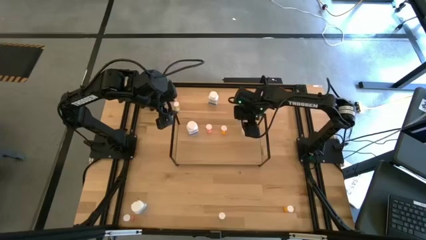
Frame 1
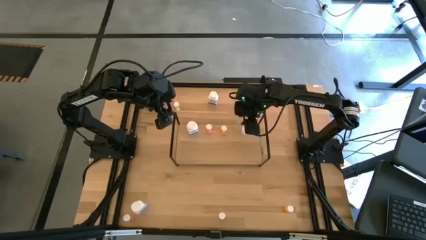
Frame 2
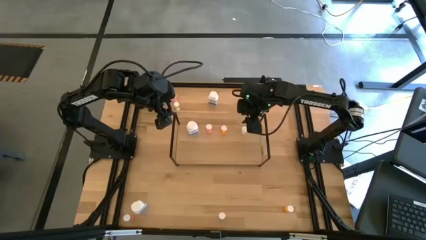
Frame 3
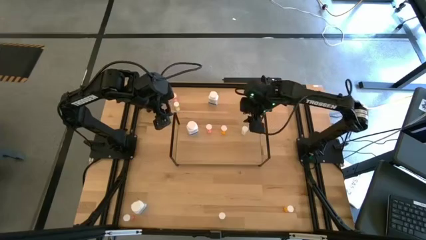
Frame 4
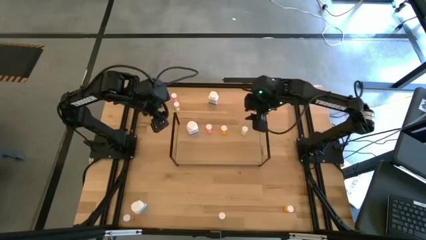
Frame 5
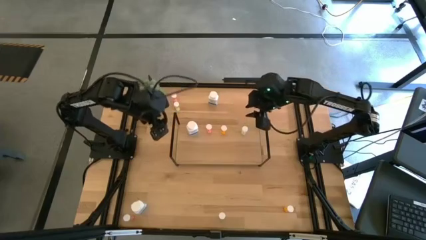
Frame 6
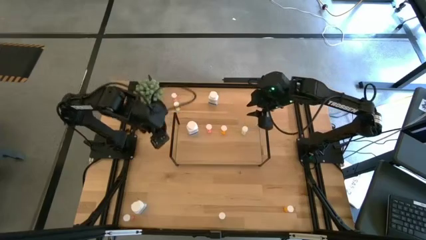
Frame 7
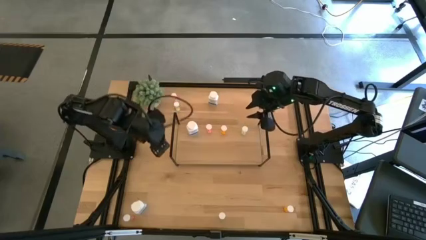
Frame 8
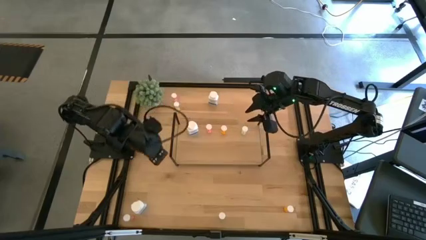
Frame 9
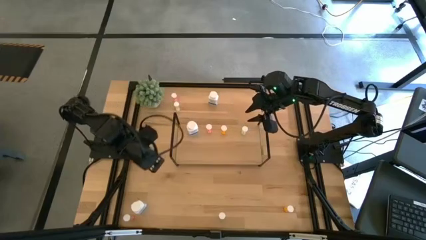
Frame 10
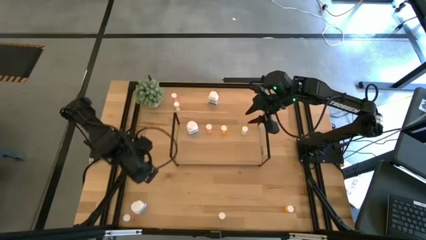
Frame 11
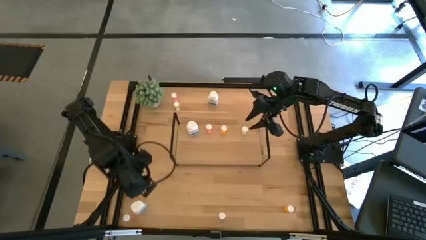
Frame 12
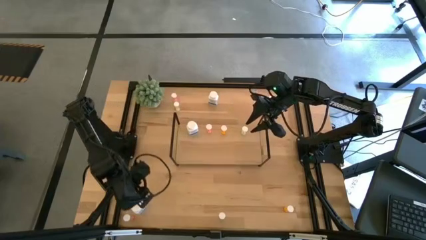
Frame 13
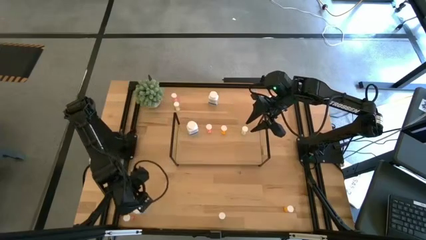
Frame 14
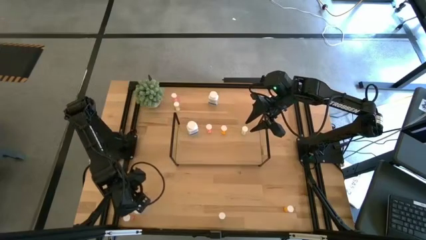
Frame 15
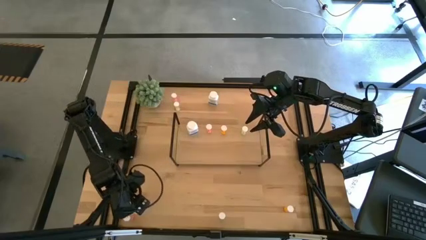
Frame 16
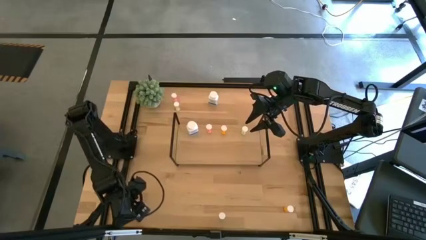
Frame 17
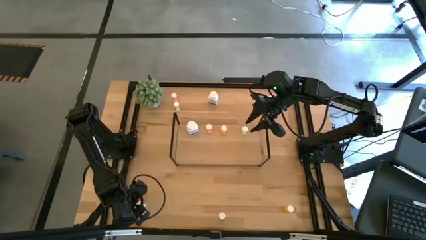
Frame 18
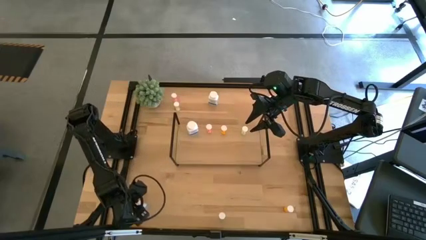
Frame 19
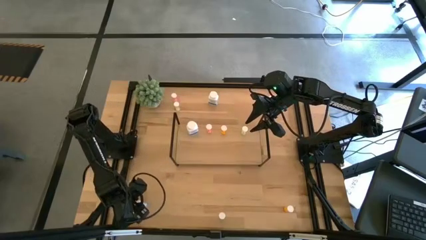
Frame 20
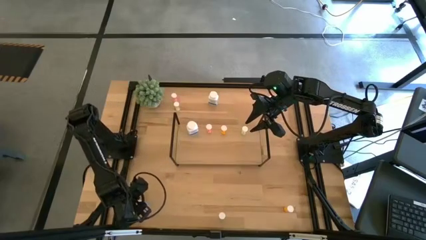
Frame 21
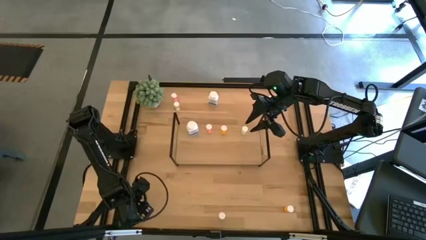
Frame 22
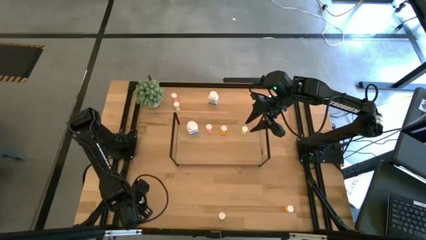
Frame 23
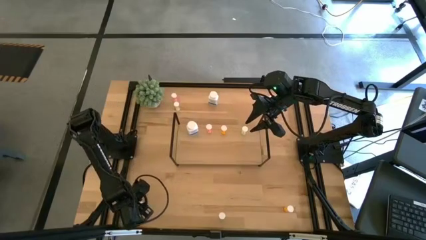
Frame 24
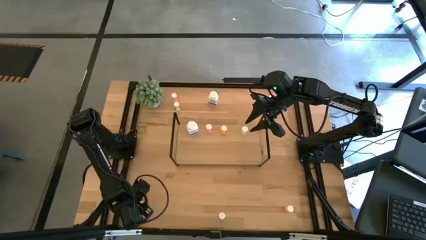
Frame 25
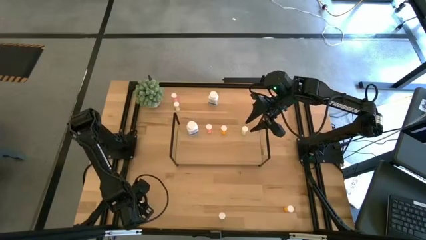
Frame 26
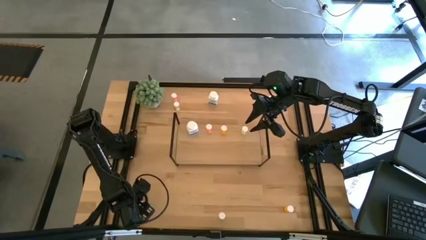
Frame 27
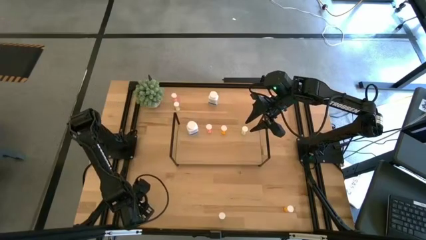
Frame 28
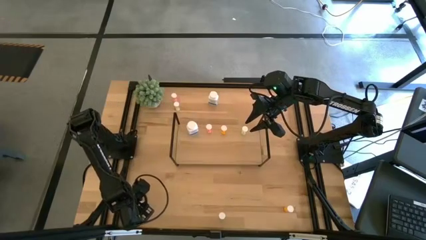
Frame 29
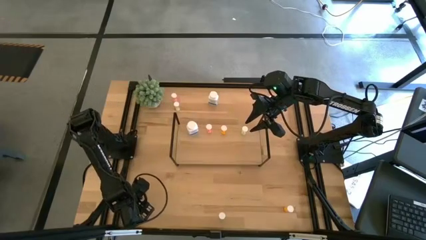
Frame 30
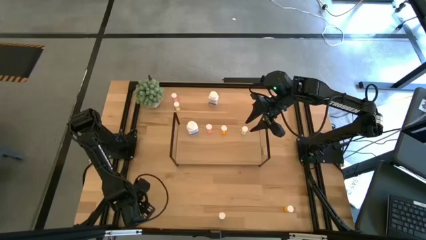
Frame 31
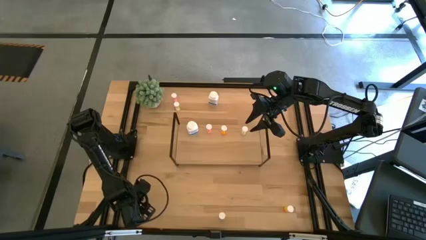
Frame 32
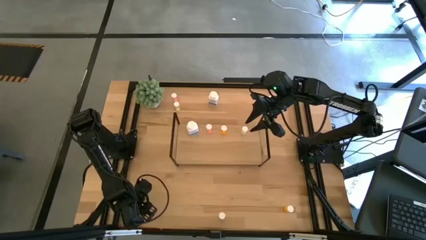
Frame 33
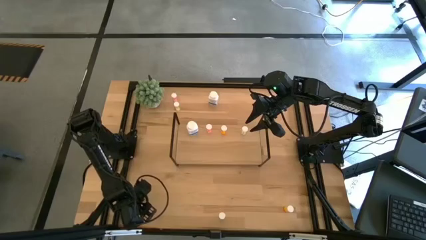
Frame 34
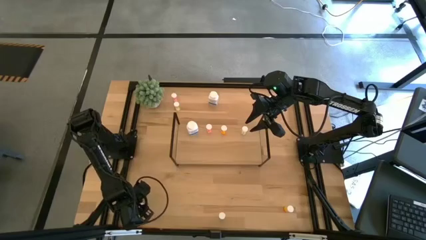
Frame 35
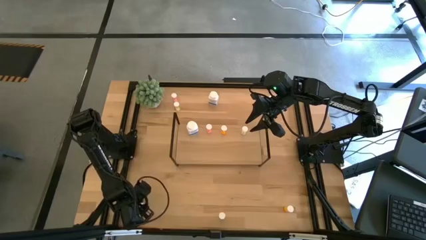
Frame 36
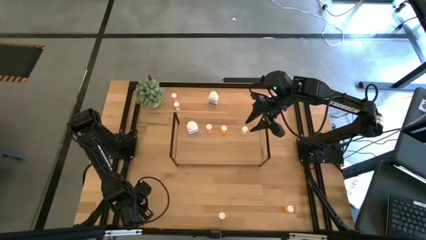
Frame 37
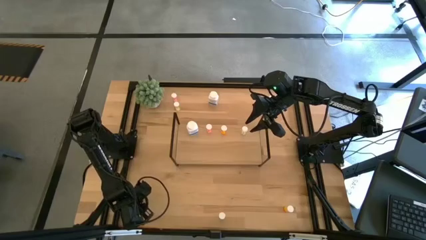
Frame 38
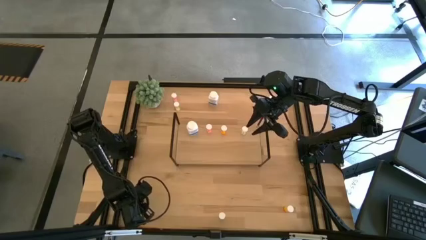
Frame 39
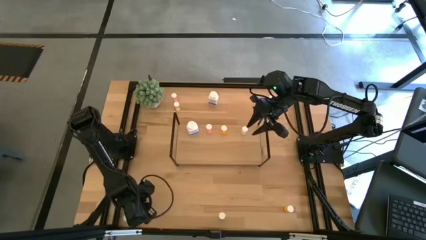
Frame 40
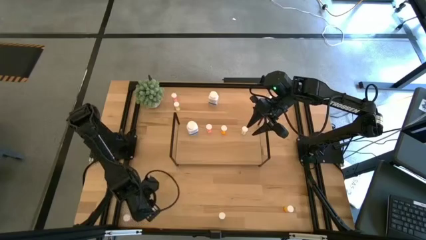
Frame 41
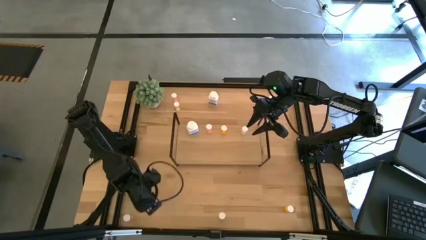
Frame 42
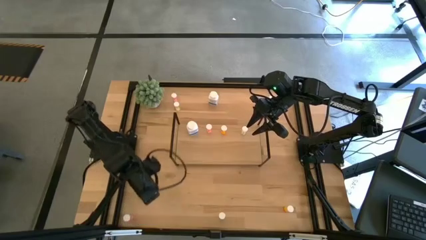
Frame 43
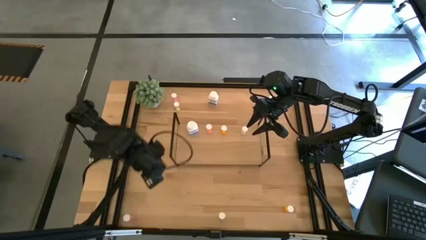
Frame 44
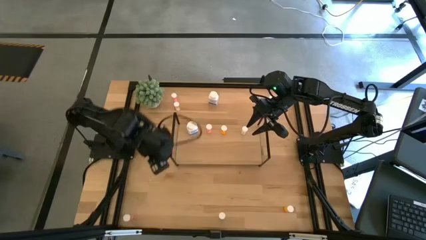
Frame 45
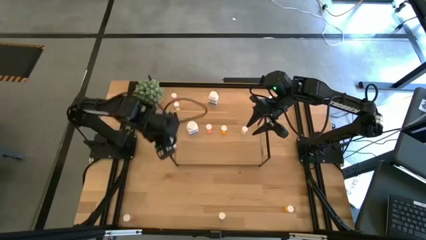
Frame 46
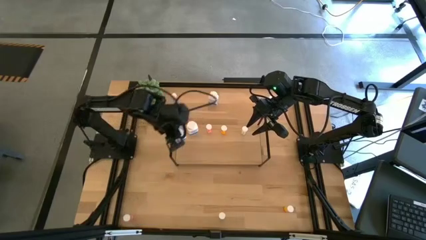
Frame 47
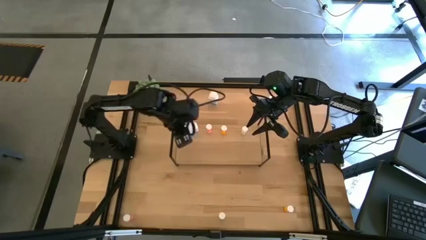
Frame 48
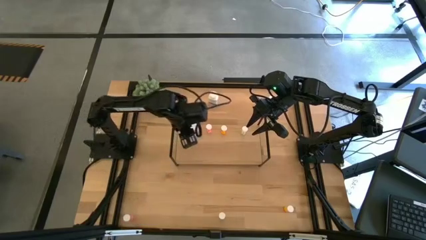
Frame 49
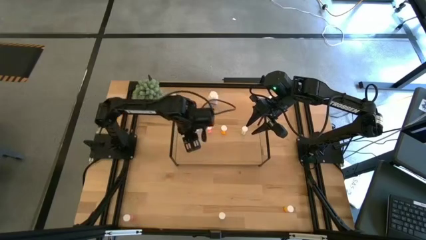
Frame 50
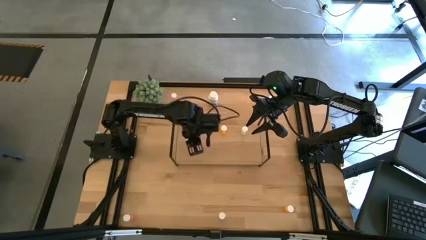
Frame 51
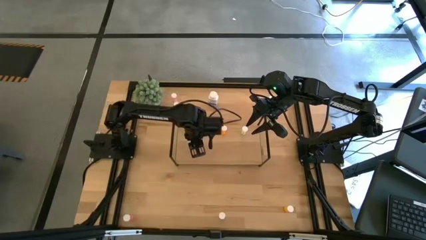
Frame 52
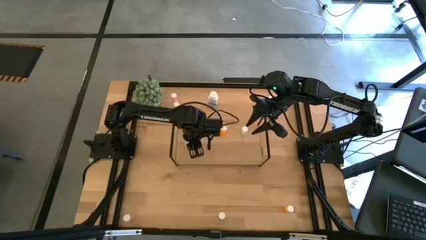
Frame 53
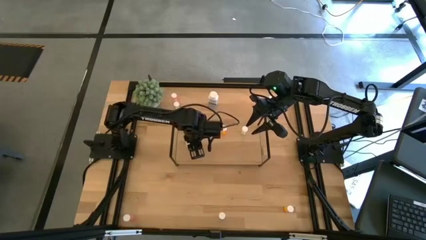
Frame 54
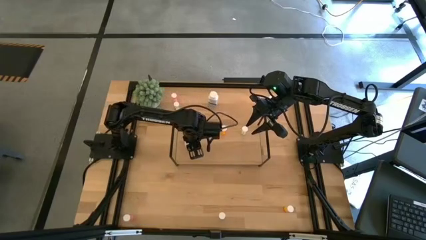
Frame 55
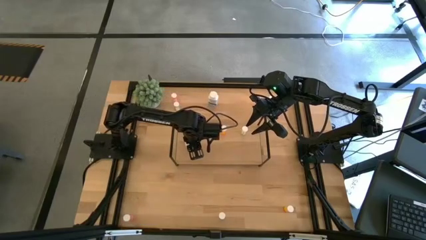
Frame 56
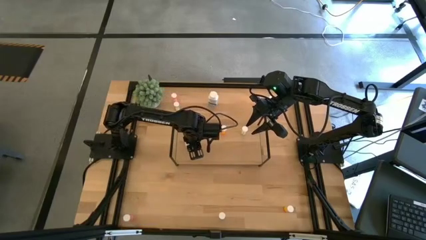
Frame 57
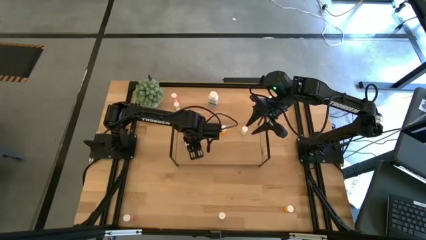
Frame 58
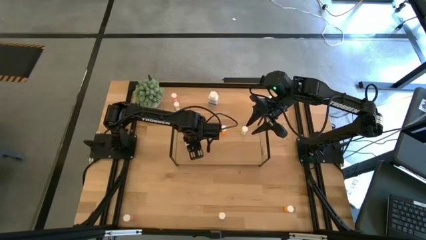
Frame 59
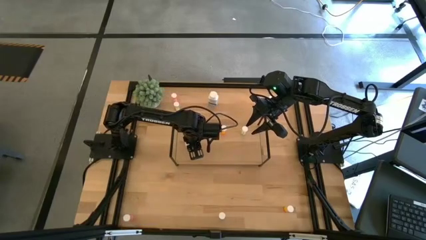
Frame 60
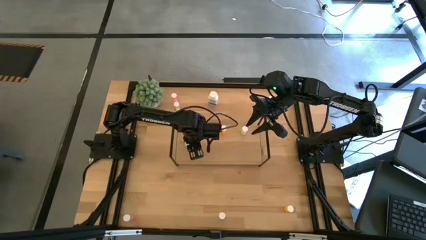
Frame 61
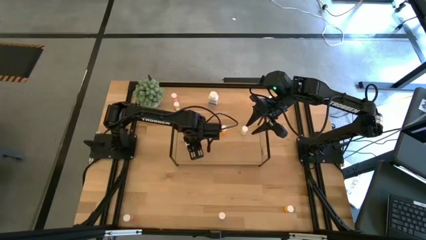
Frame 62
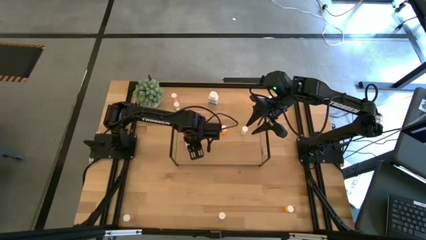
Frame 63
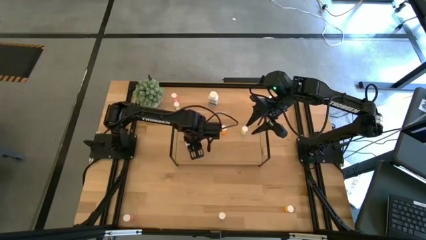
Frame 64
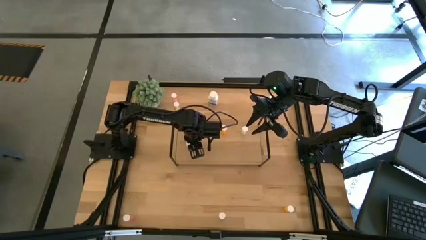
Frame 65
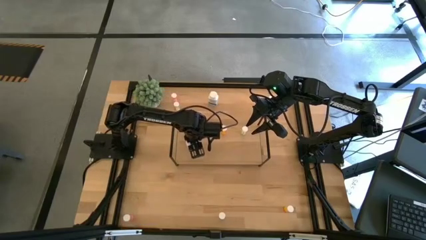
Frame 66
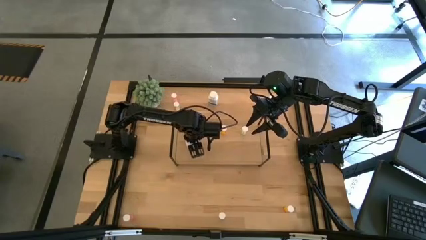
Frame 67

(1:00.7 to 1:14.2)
Task: Pick and place medicine bottles onto shelf by color
Put the bottom white pill bottle on the shelf aligned with the white pill bottle

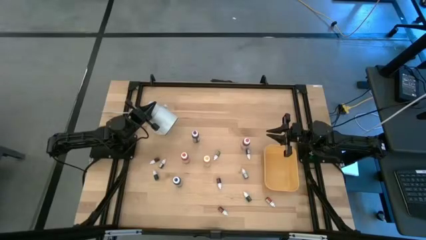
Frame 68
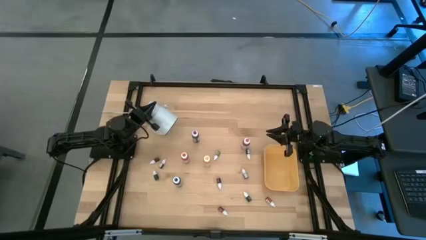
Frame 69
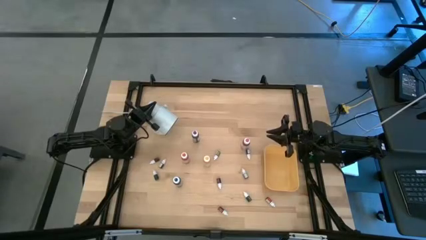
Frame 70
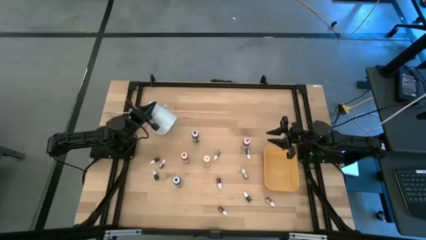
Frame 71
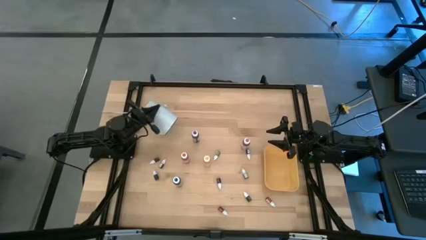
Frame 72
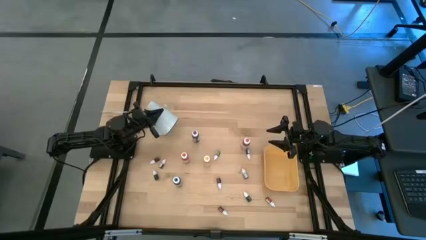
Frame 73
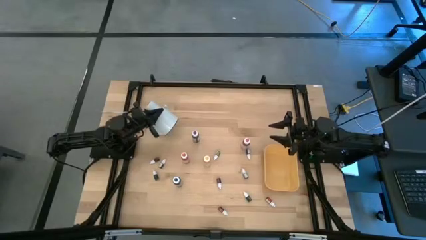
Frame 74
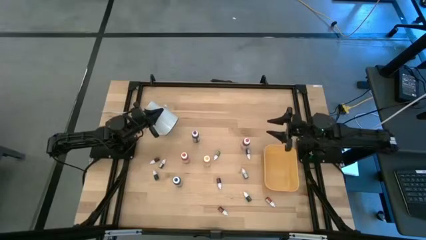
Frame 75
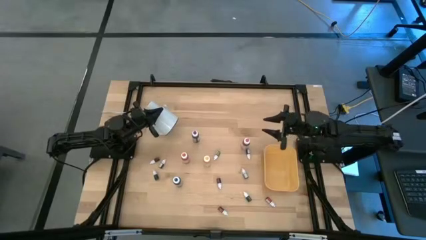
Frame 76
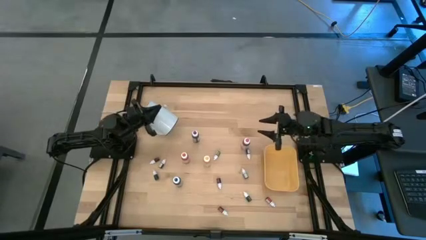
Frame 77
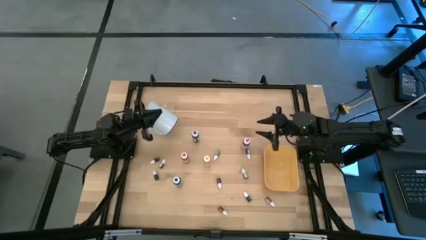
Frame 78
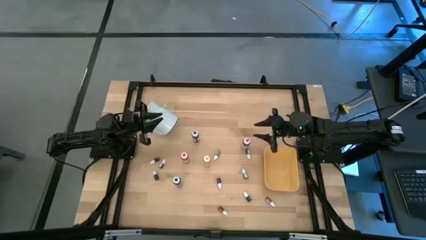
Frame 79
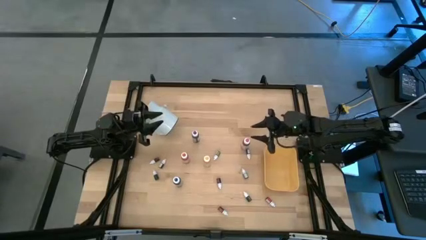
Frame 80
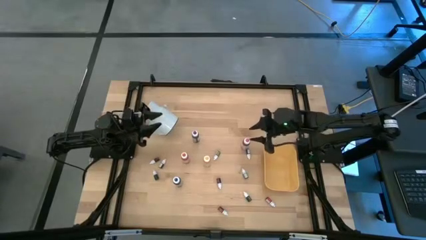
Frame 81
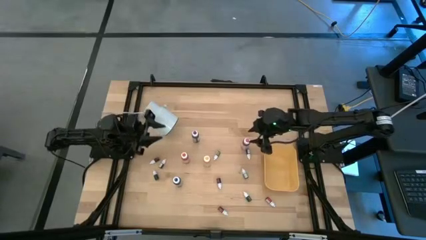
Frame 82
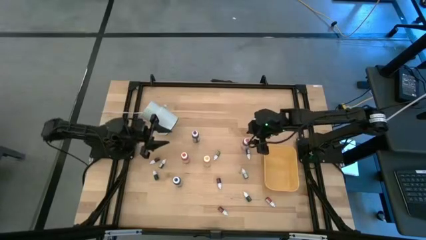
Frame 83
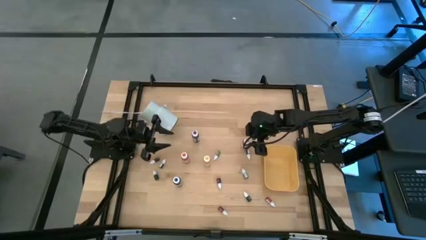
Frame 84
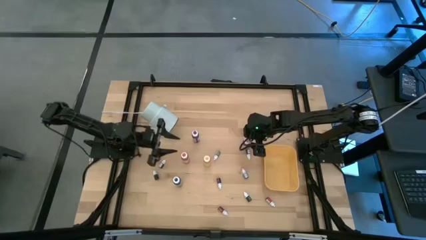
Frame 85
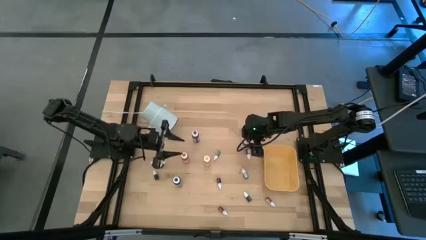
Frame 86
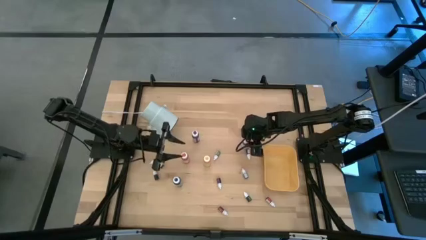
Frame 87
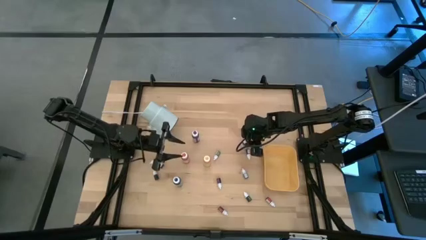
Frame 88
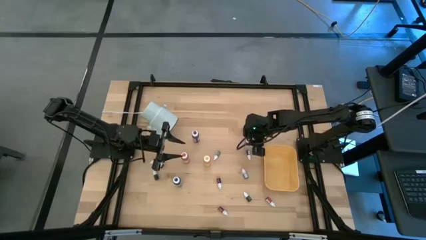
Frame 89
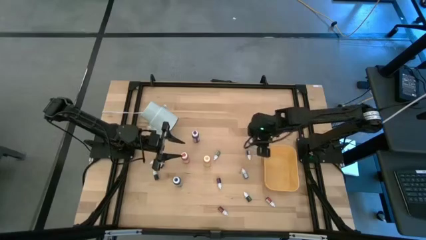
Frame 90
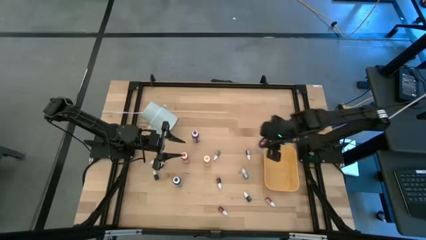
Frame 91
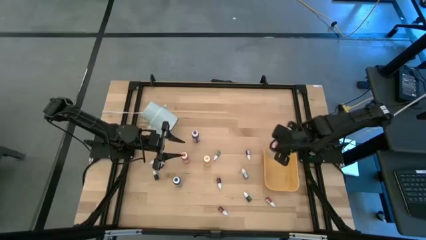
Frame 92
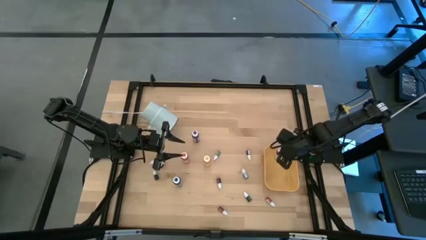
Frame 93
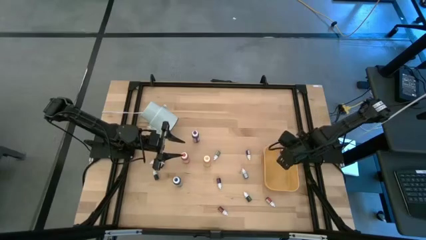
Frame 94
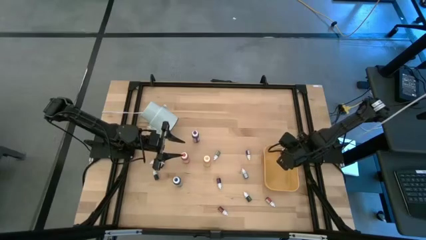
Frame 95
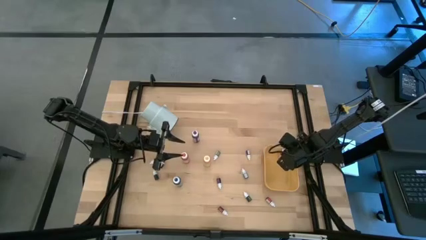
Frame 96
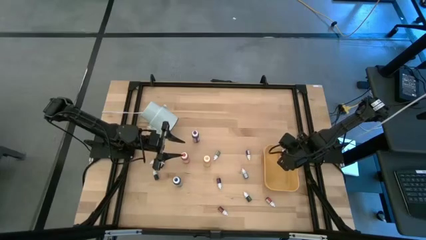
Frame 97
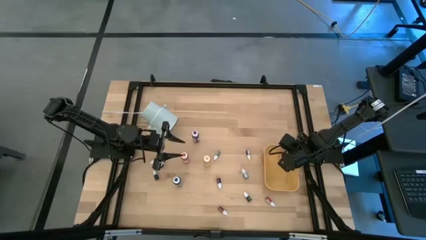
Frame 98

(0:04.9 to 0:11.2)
Task: Pick & Place food coloring
Put the large pink food coloring bottle into the yellow bin
